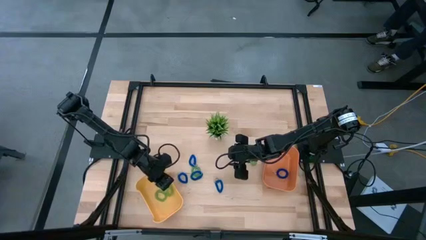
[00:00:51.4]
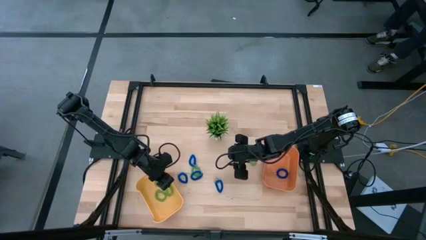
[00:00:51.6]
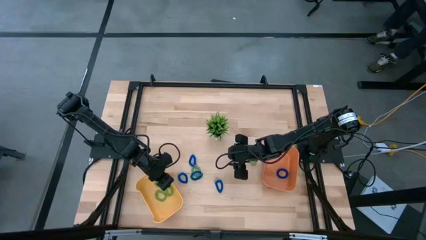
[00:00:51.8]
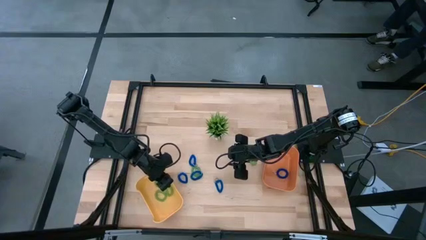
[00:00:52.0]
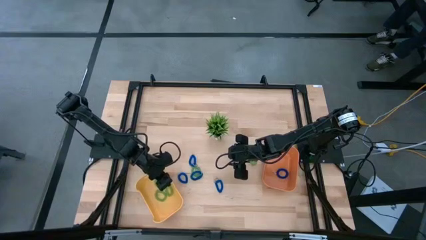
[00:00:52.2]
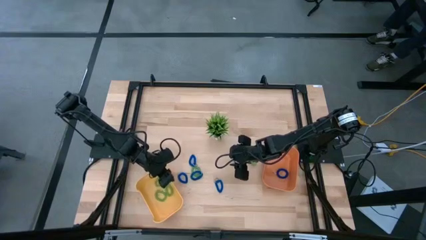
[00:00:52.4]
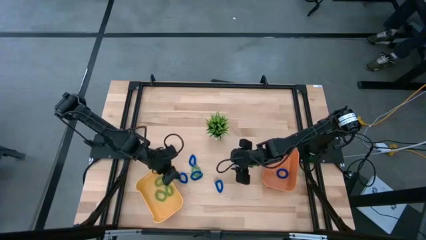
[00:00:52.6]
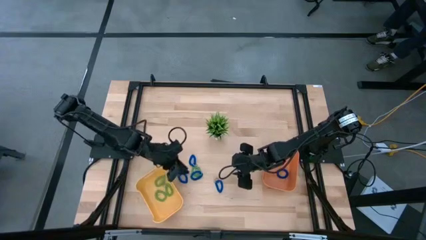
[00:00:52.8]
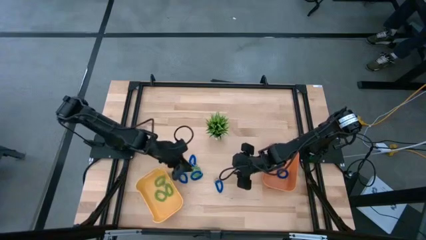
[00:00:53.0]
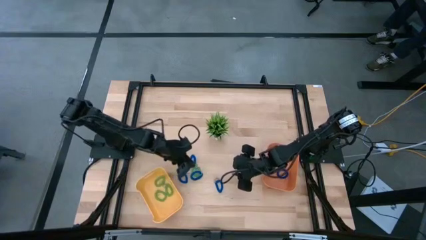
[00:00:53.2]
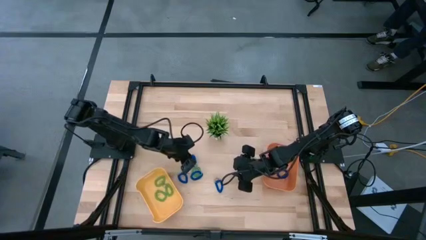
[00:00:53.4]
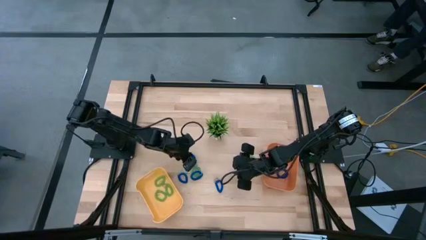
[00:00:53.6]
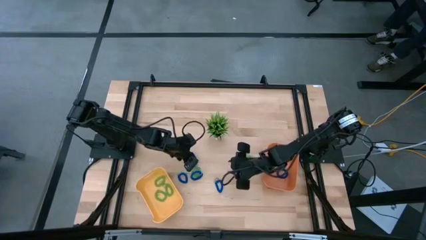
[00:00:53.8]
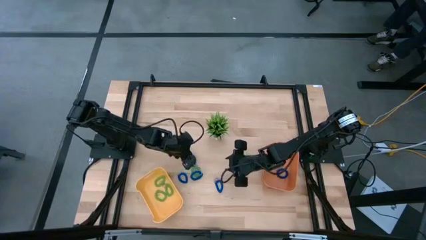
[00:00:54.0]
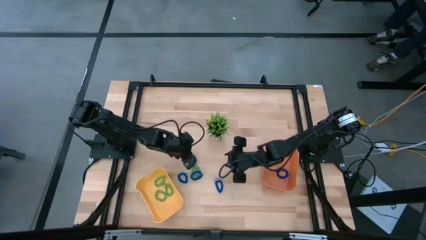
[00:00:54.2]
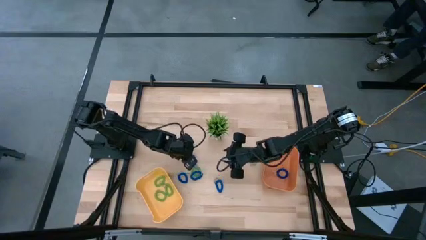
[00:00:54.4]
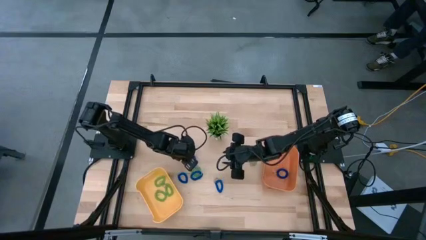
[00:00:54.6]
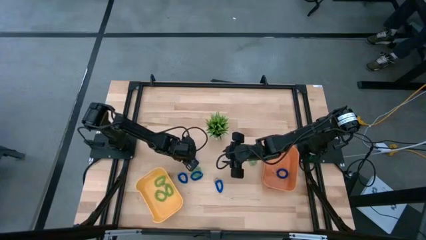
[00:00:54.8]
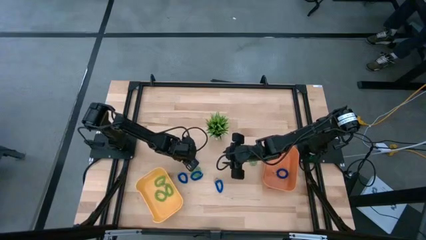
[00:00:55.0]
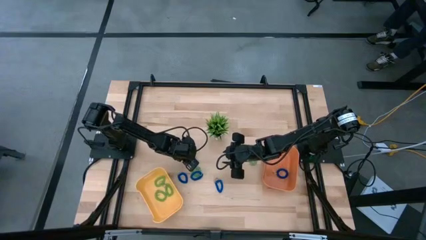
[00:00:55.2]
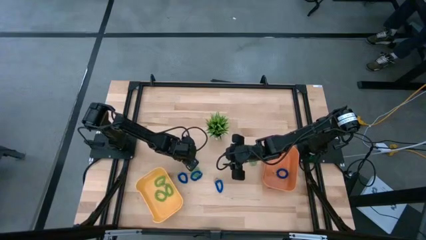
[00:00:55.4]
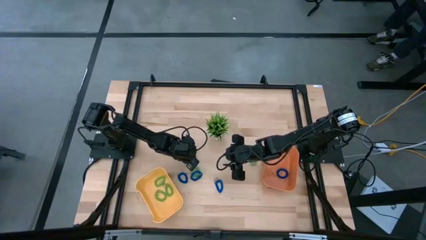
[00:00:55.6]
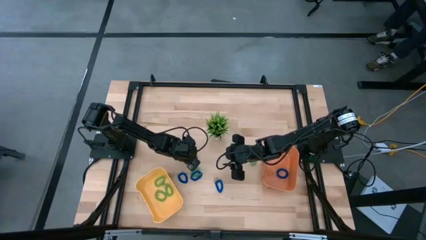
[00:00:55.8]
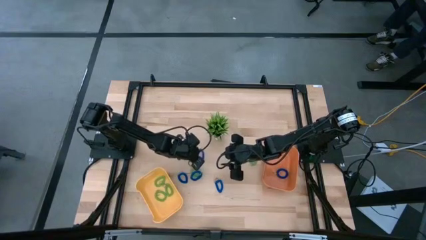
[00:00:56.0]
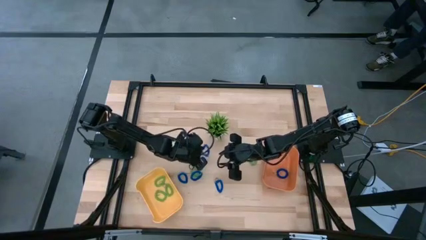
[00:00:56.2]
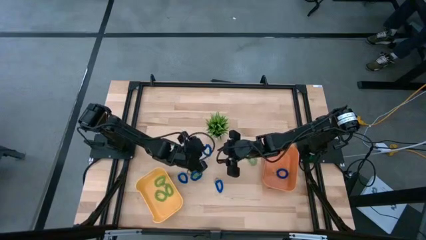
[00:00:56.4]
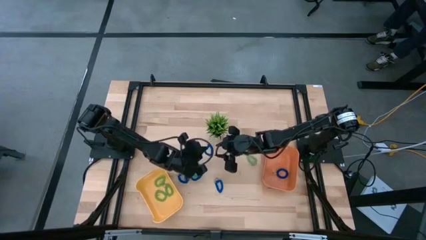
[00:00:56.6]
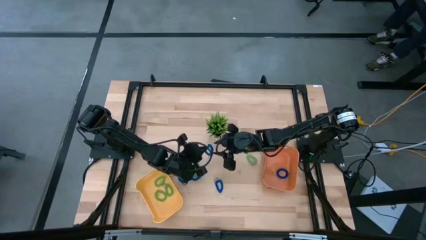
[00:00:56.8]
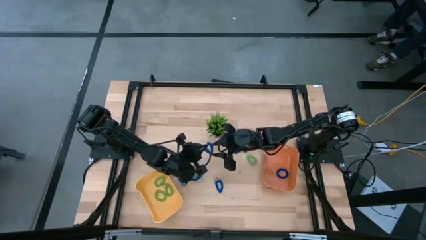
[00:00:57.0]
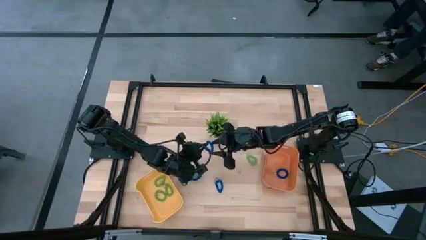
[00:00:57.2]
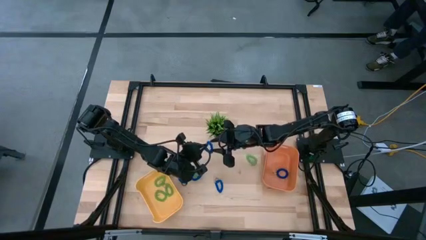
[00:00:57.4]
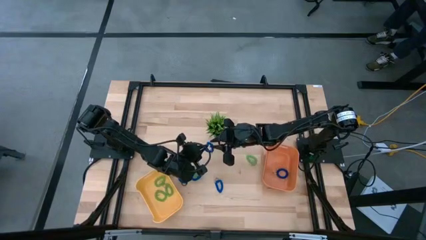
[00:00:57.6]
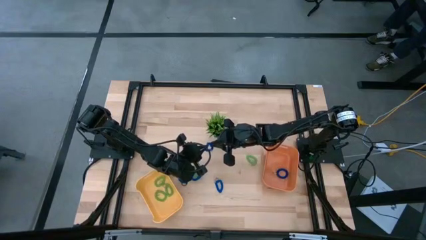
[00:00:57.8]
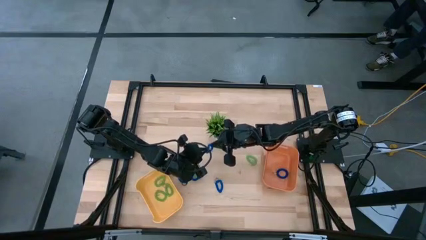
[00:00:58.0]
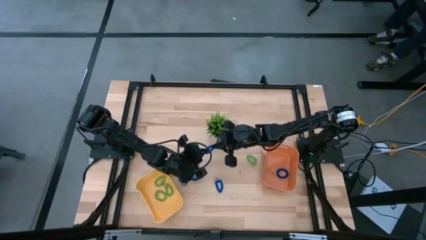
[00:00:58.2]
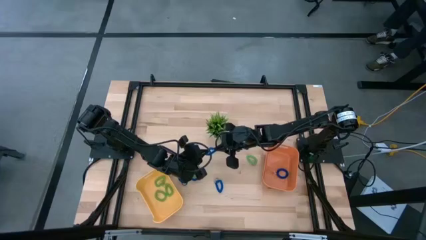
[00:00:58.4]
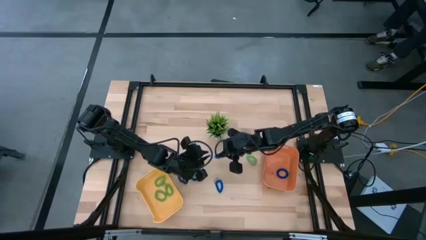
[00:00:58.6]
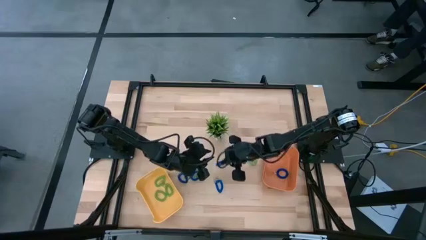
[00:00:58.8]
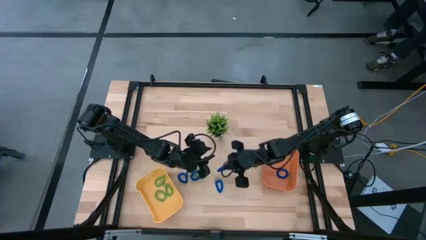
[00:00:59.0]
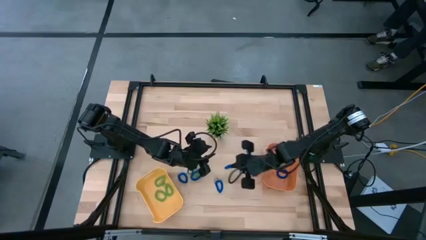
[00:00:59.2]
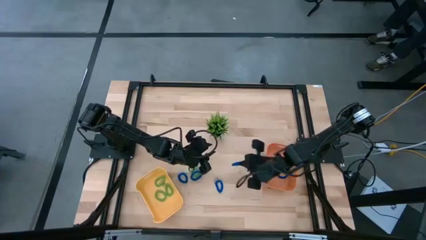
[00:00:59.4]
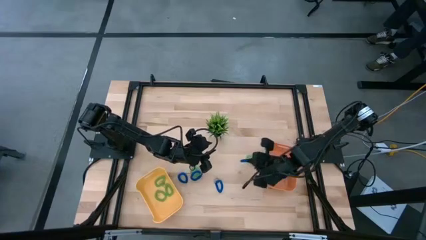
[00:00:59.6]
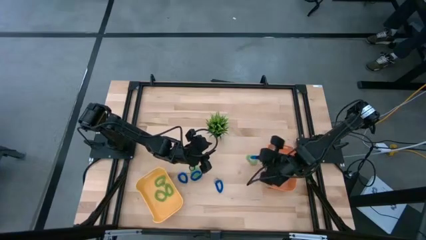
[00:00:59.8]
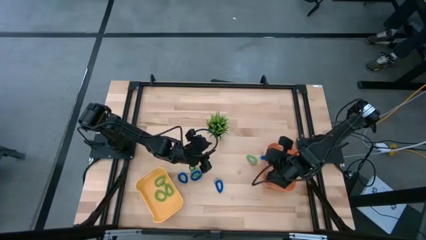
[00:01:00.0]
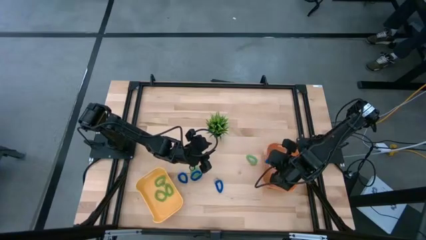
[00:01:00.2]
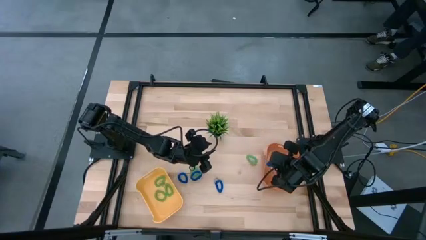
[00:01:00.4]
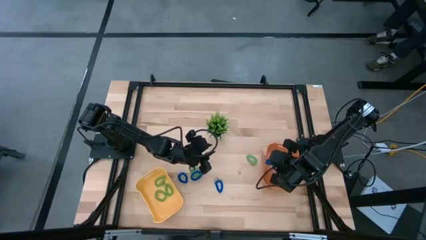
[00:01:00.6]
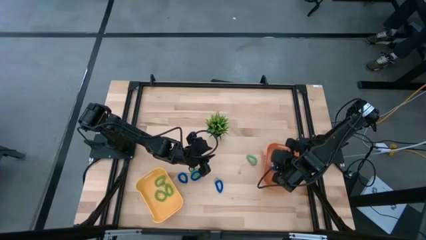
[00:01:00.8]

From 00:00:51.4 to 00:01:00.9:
Task: Sort spring keychains
Put the blue spring keychain into the orange bin

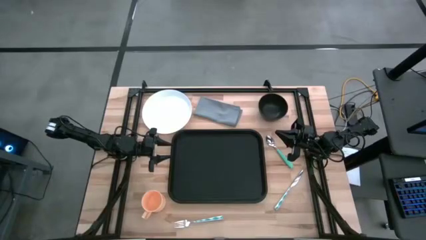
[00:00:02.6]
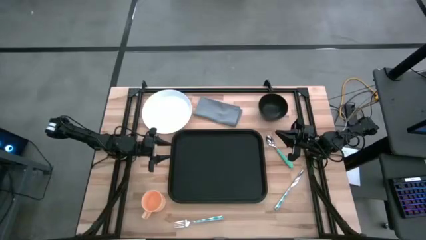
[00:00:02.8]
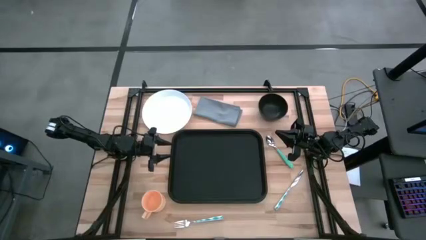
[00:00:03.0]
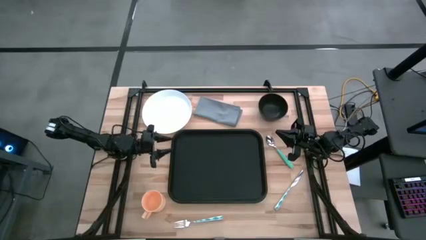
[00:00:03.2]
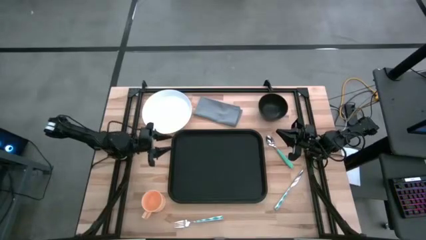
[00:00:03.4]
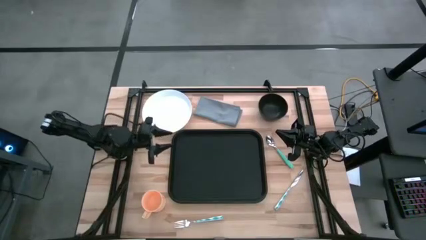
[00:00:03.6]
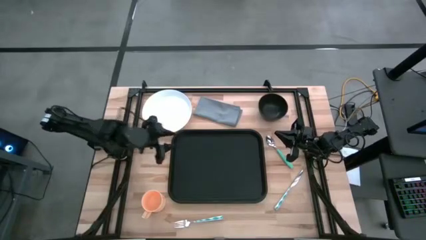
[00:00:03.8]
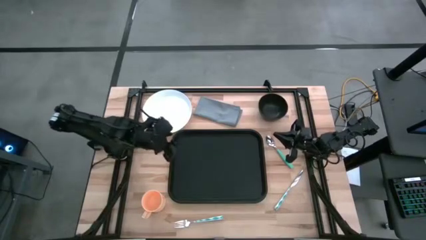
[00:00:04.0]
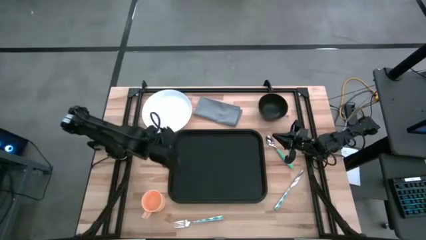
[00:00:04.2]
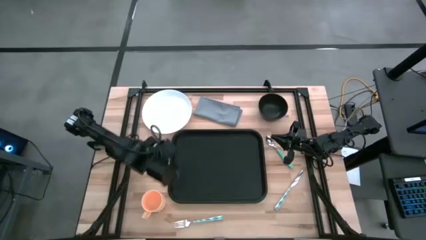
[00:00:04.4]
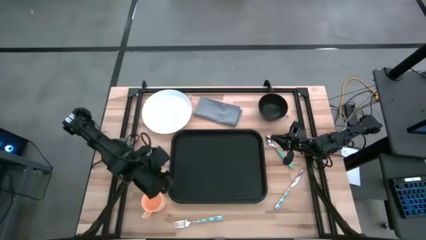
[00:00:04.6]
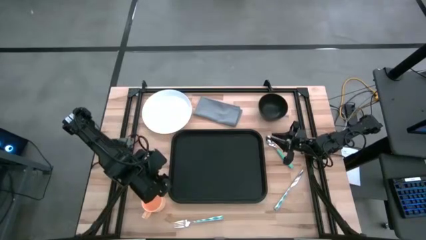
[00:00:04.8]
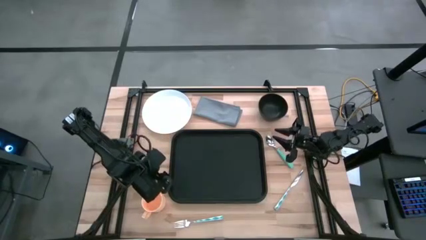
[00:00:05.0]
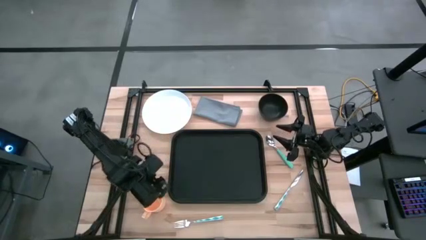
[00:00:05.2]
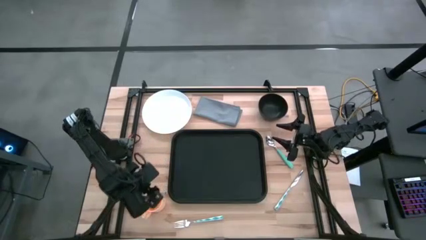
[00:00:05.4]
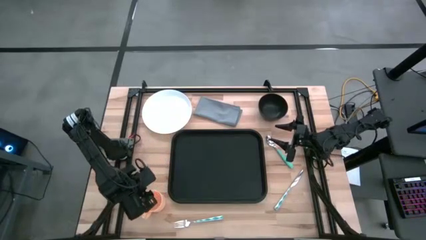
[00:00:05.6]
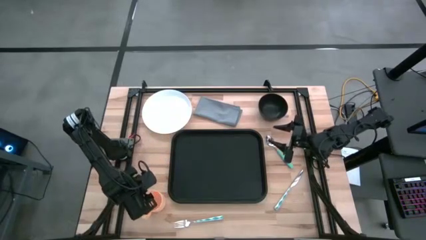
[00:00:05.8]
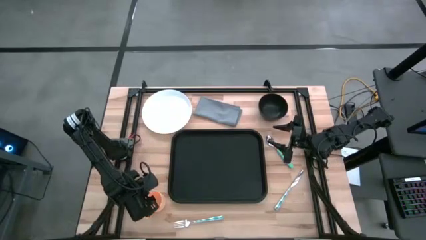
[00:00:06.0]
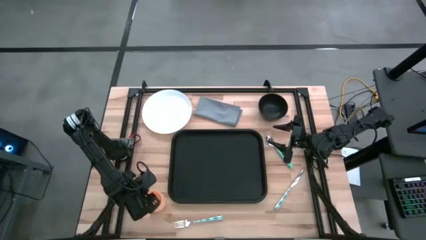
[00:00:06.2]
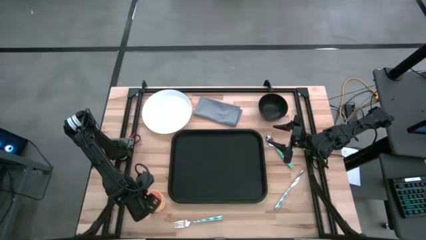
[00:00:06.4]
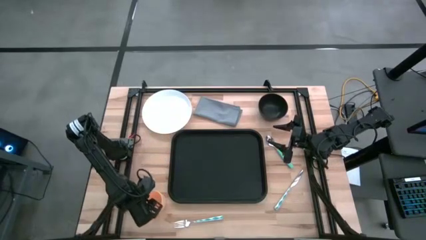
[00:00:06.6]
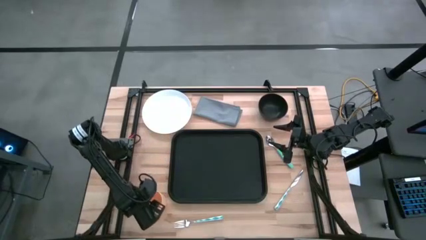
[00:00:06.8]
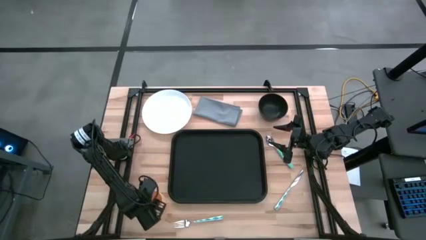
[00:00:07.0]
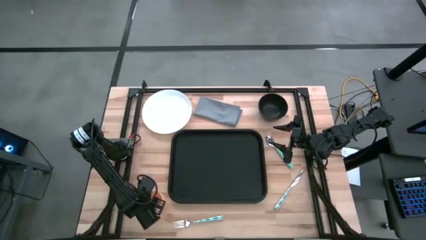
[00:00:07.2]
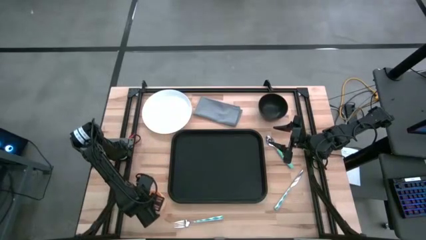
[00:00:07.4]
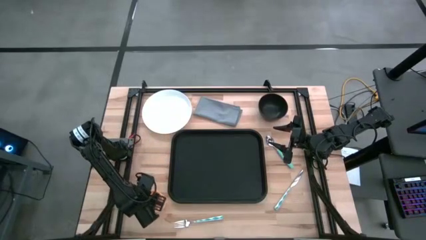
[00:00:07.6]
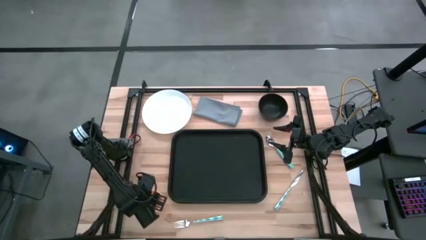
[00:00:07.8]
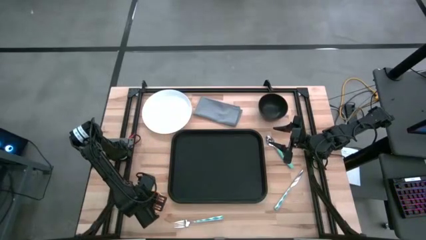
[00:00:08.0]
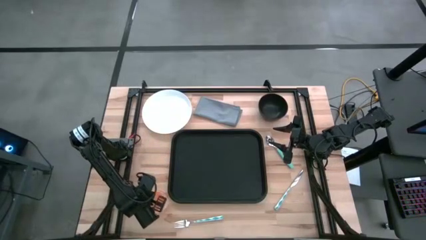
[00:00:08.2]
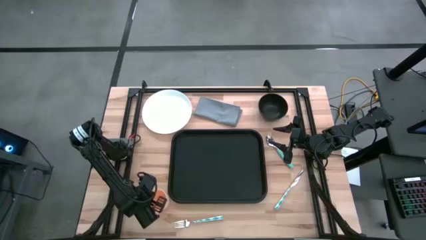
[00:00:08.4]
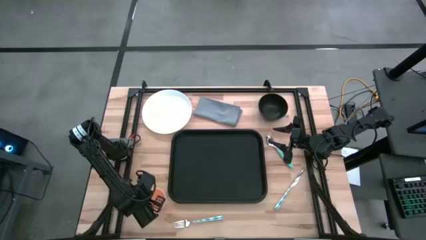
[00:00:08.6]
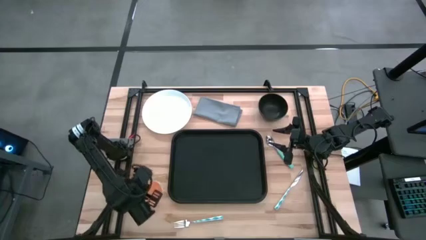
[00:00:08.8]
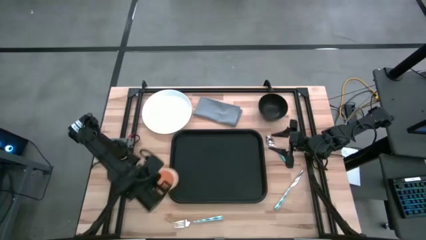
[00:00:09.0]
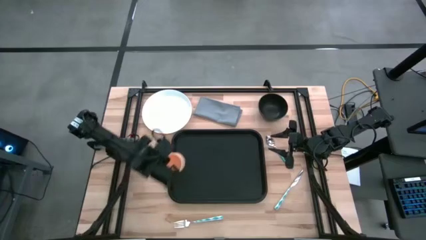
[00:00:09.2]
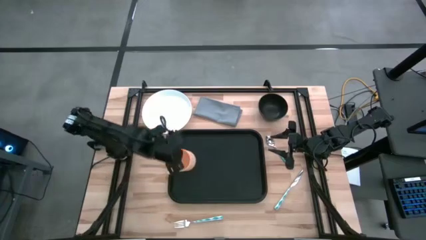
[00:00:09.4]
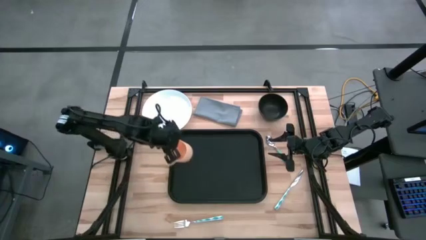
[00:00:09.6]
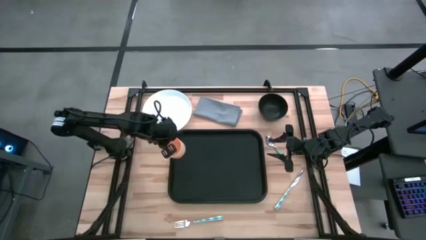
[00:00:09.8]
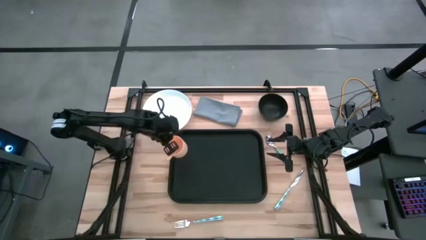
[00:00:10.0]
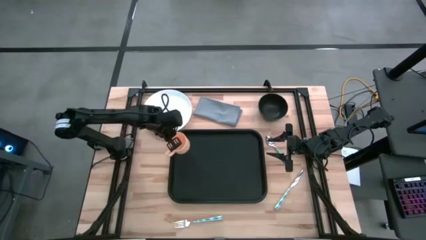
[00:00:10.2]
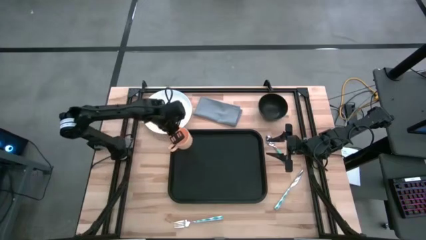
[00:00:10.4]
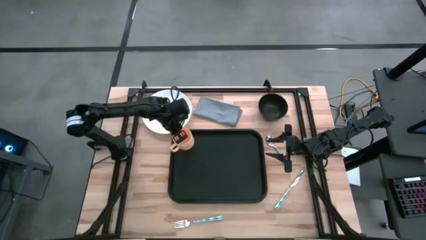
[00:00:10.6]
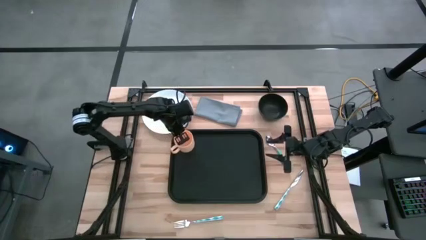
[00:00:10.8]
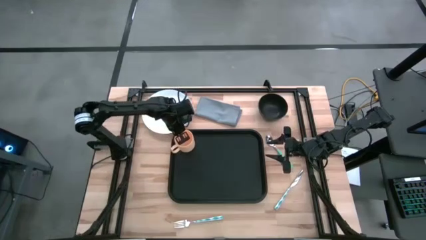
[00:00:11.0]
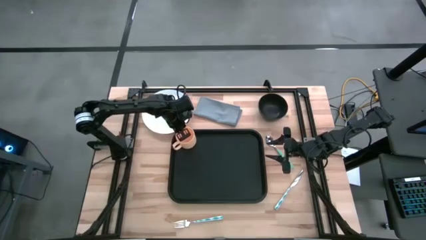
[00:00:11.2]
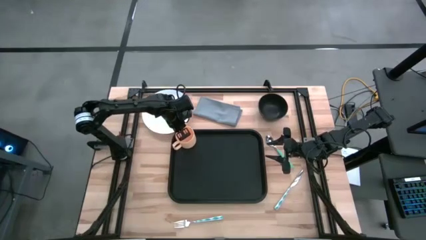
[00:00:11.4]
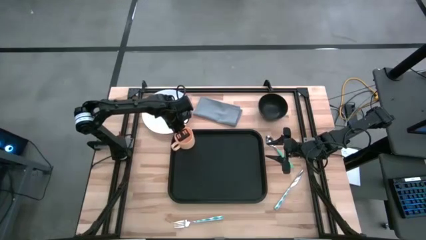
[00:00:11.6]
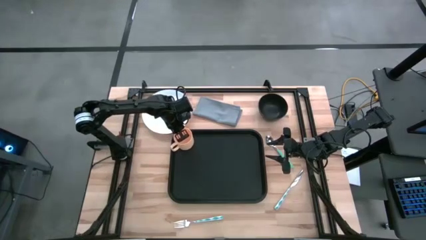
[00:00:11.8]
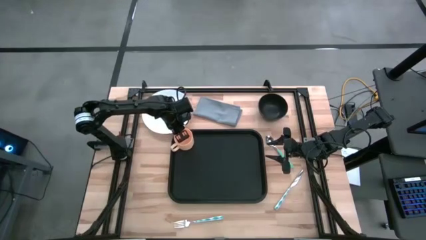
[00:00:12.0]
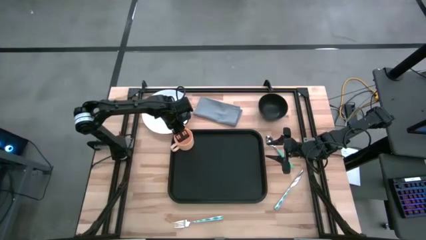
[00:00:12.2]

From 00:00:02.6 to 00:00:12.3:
Task: Set up tray
Put the orange mug on the black serving tray
